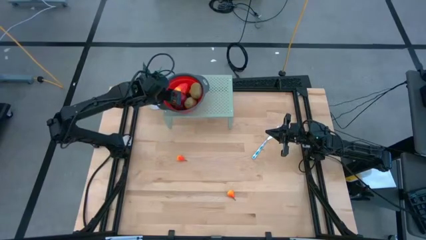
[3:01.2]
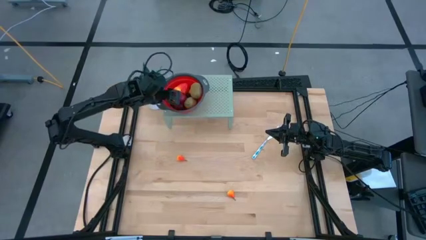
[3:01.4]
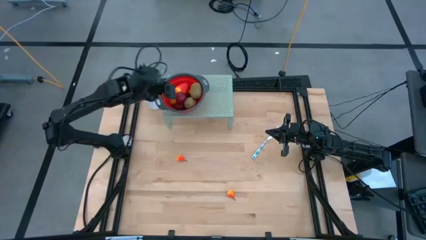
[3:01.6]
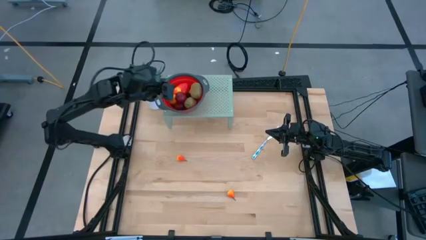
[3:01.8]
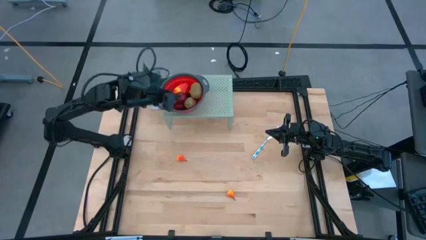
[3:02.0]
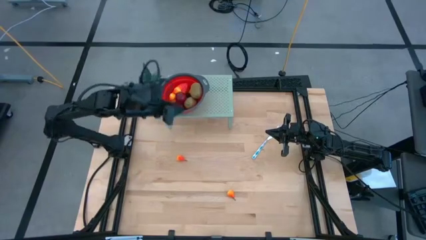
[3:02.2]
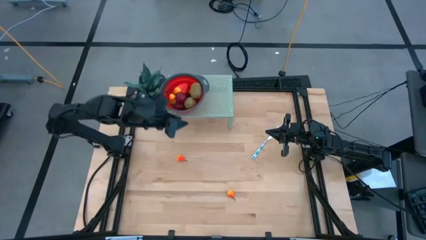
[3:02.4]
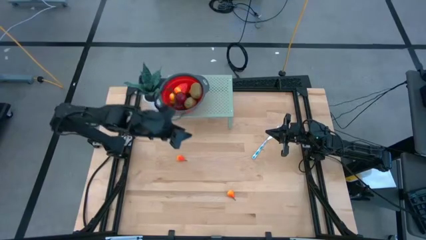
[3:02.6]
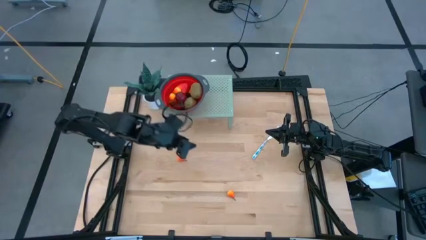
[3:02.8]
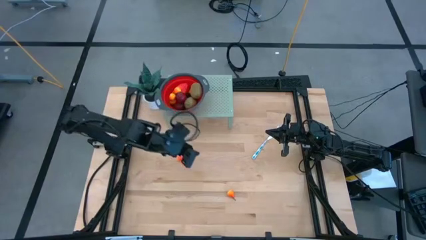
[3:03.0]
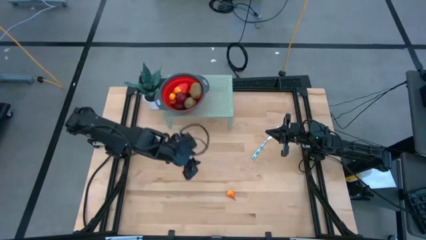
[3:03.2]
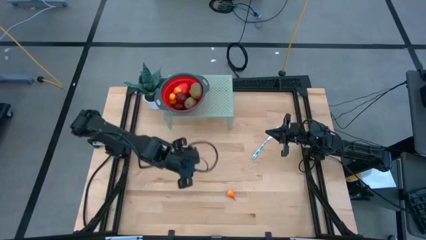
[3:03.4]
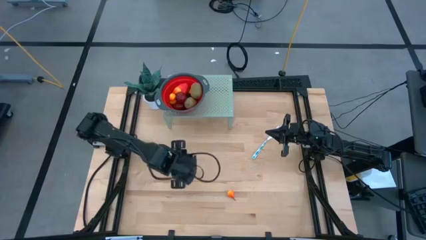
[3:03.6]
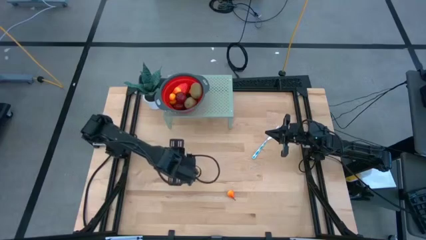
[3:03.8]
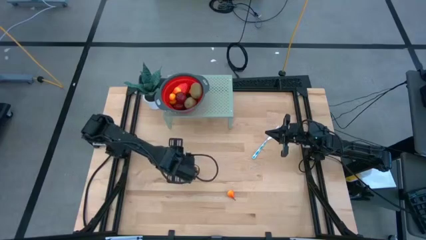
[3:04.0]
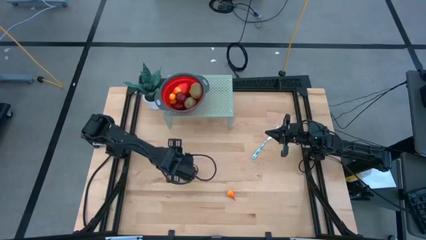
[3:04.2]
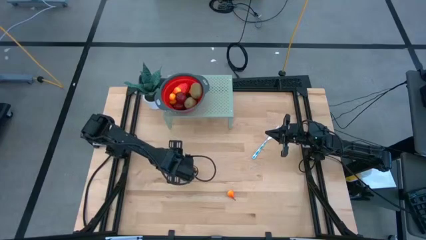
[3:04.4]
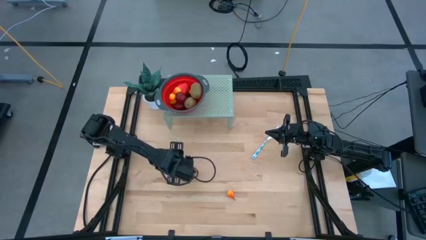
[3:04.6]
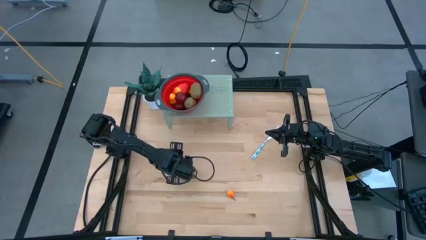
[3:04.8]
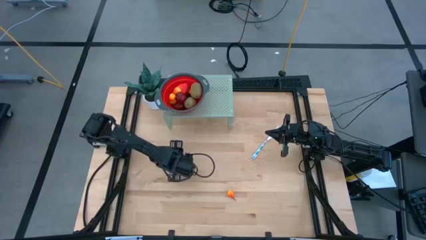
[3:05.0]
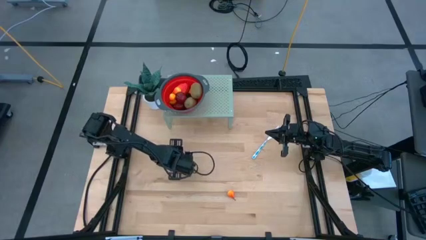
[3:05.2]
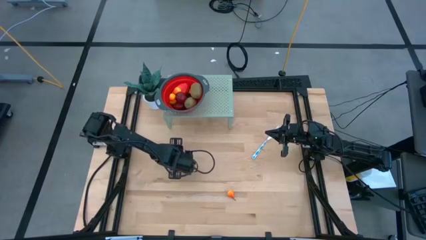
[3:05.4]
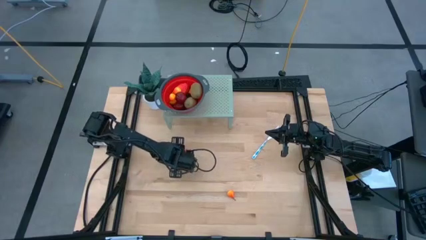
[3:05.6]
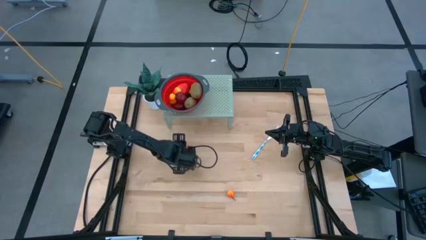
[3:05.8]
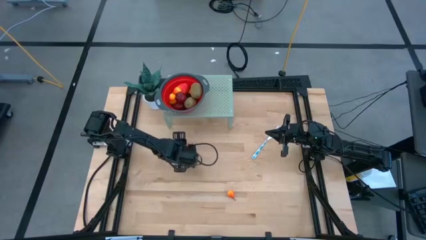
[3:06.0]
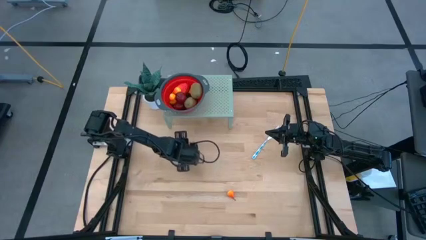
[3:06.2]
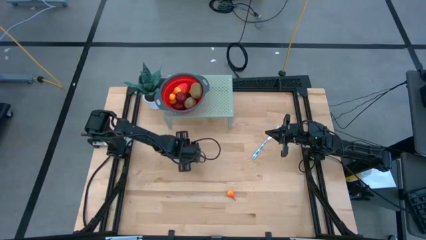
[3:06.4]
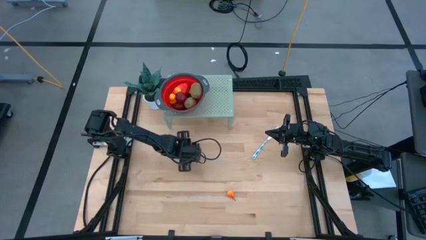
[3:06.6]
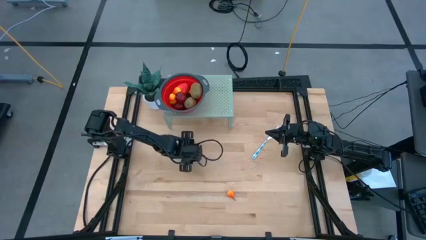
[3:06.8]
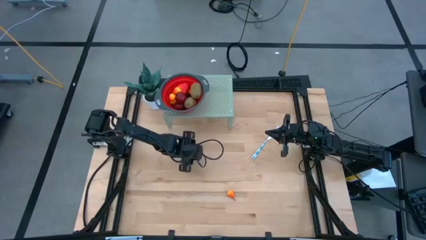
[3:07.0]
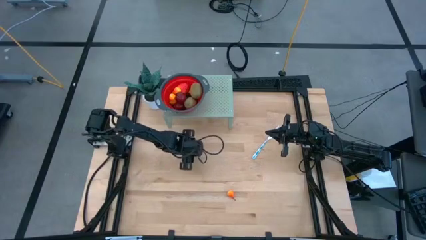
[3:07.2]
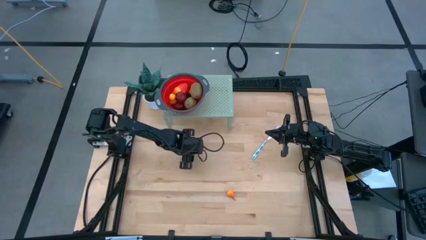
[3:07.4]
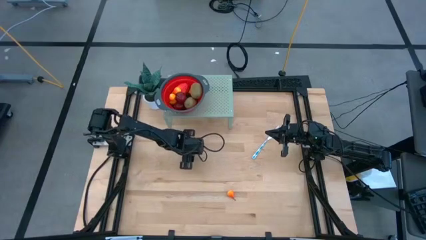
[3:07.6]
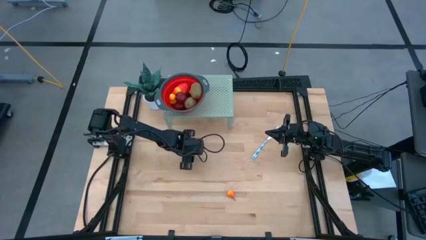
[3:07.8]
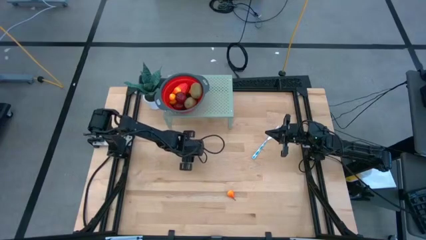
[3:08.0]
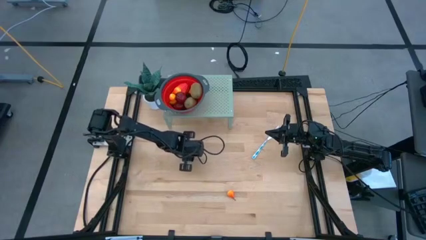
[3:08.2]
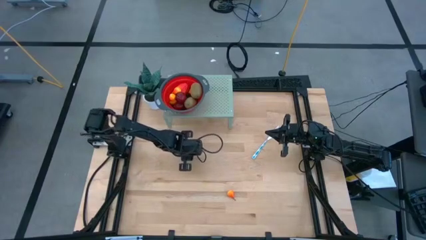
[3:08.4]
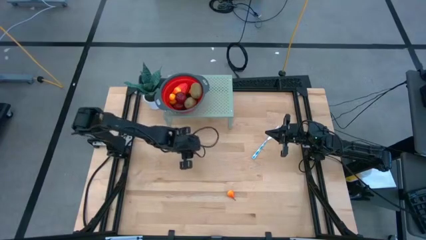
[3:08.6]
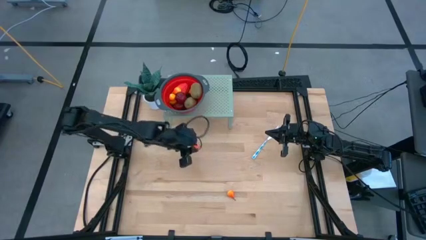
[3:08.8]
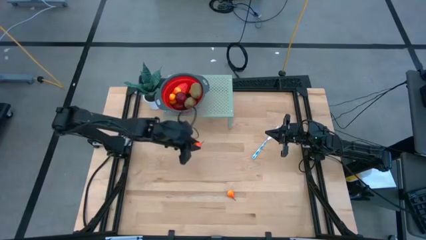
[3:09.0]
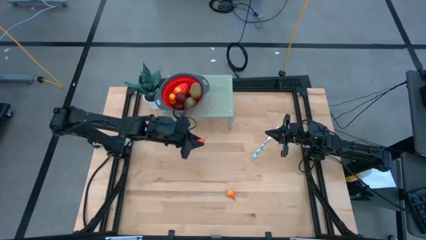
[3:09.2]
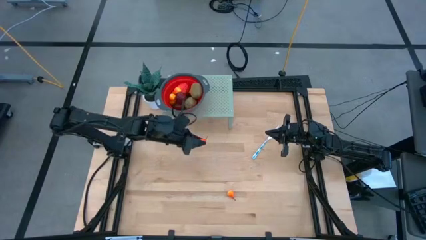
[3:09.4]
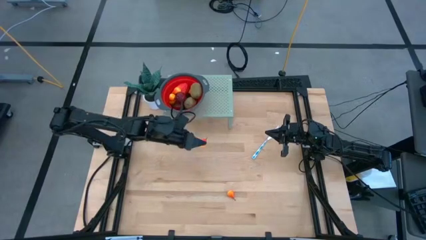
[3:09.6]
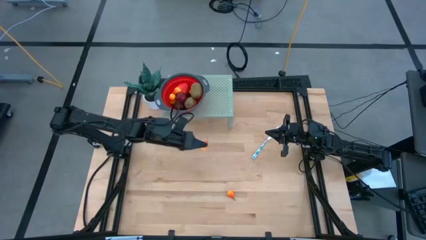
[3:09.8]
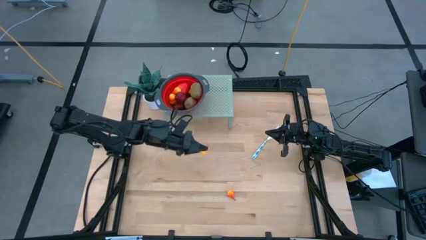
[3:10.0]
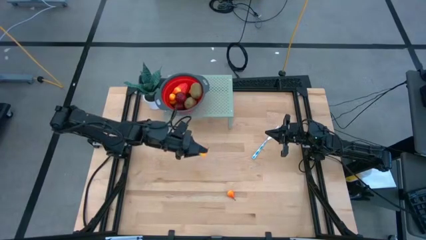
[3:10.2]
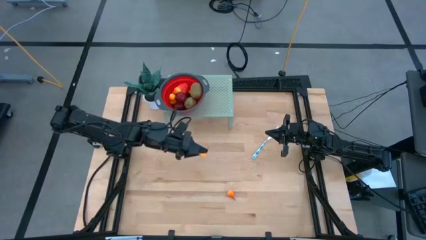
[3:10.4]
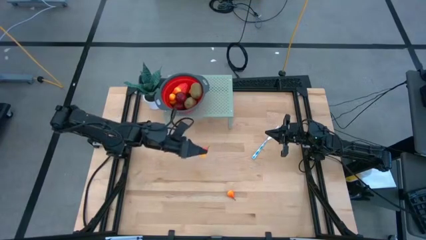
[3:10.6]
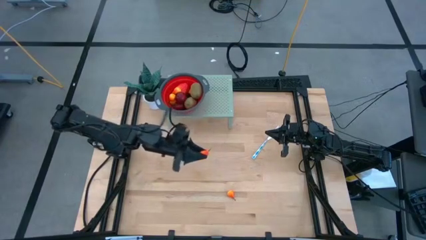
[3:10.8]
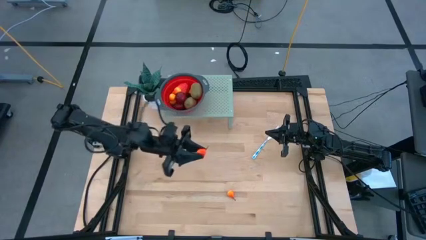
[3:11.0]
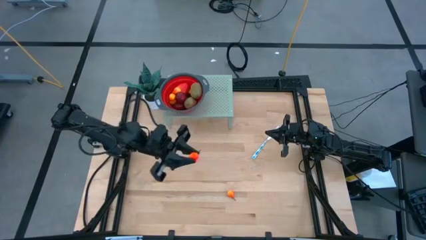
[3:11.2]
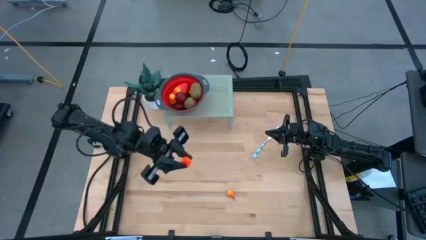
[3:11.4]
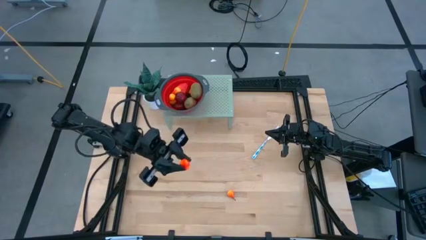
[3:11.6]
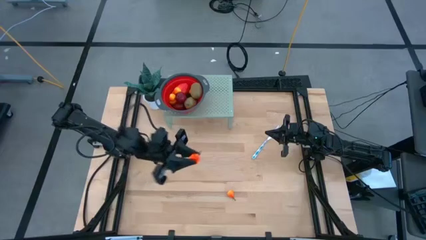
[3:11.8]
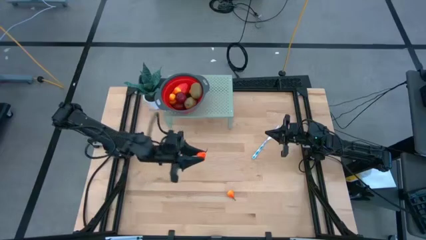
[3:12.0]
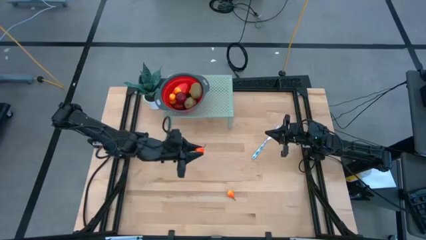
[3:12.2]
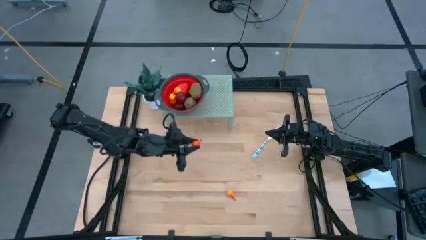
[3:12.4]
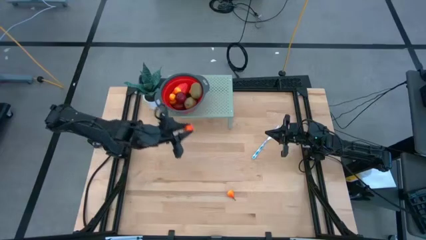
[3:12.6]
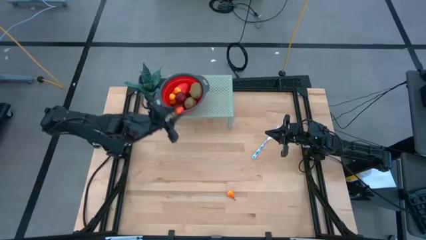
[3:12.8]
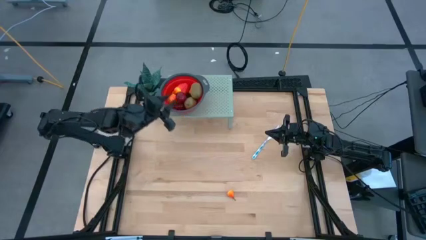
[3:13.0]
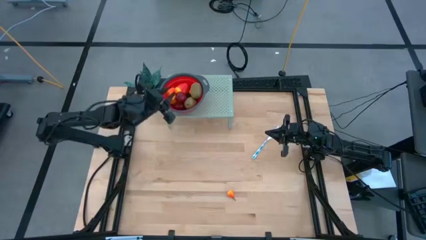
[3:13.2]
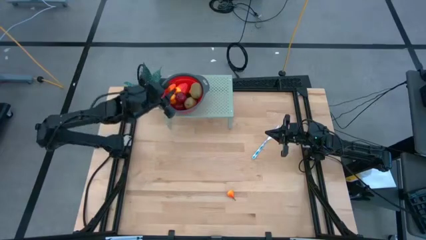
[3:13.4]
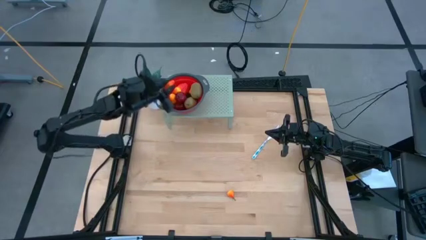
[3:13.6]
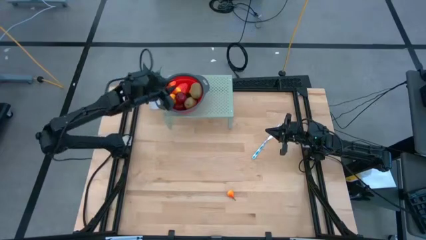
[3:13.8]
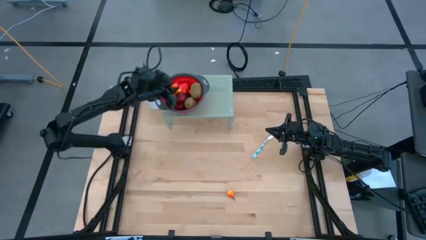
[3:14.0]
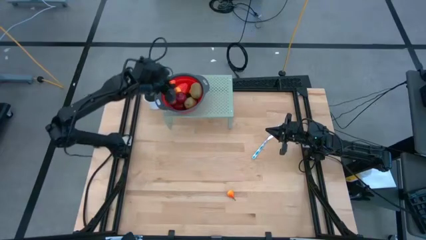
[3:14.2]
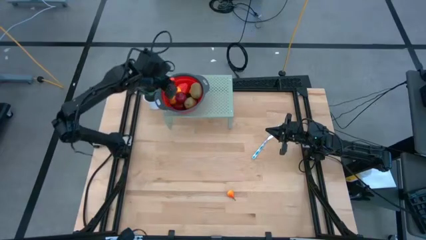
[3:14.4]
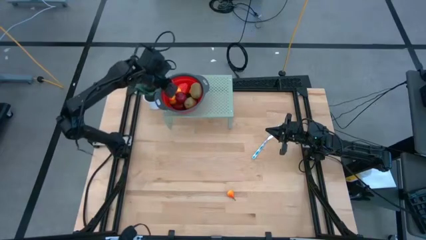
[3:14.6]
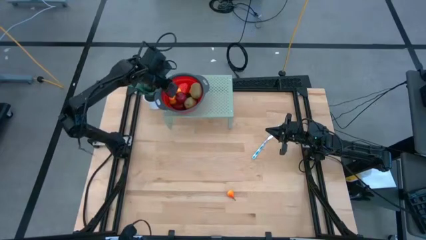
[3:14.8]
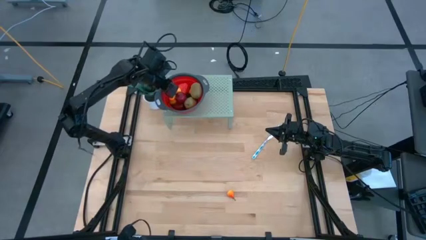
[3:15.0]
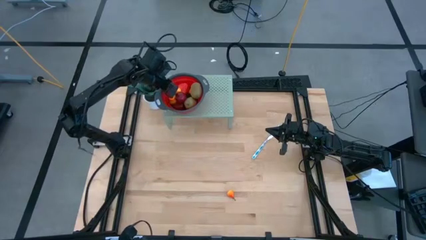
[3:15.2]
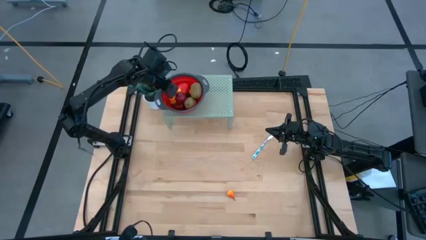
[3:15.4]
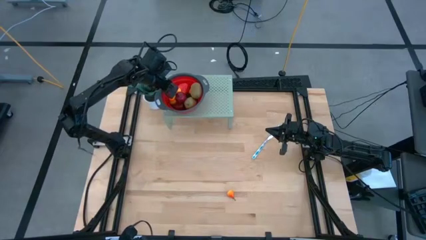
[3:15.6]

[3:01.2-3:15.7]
Task: Pick & Place Fruit
Put the pear into the red strainer bowl on the shelf
